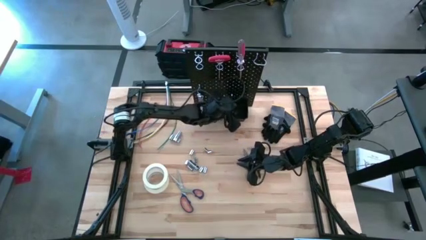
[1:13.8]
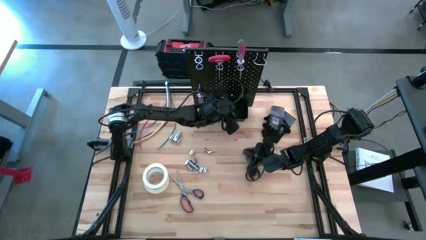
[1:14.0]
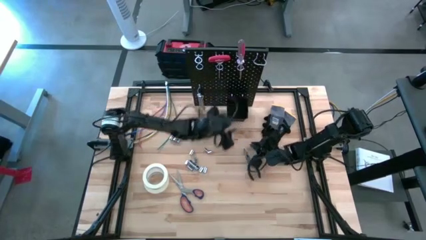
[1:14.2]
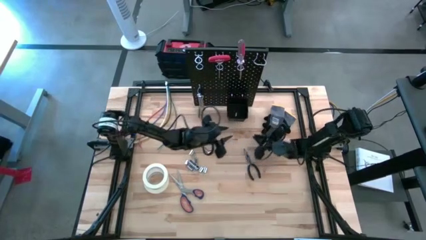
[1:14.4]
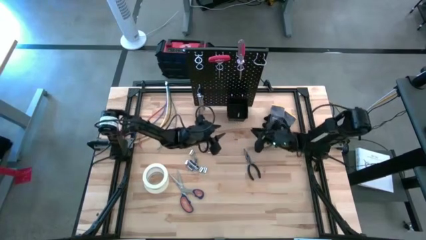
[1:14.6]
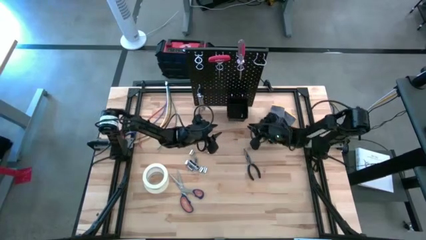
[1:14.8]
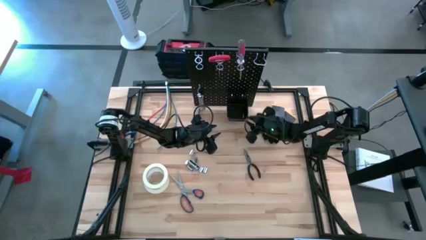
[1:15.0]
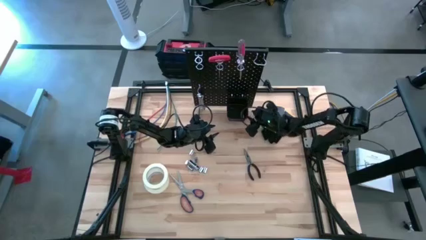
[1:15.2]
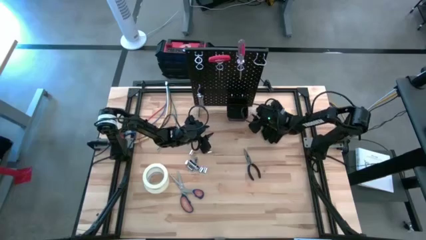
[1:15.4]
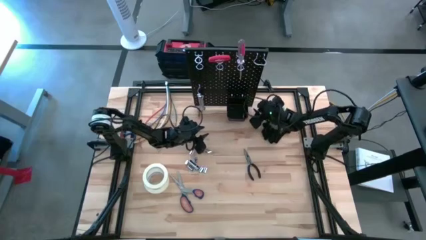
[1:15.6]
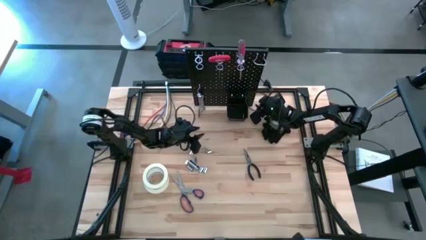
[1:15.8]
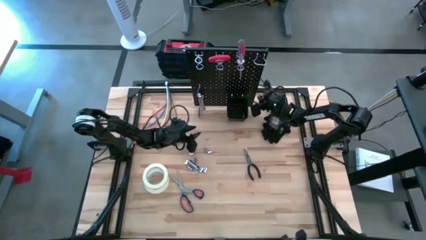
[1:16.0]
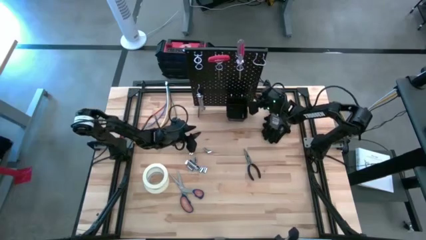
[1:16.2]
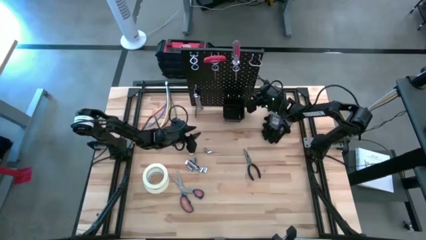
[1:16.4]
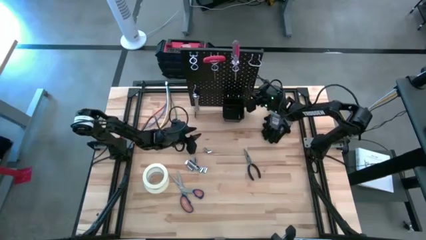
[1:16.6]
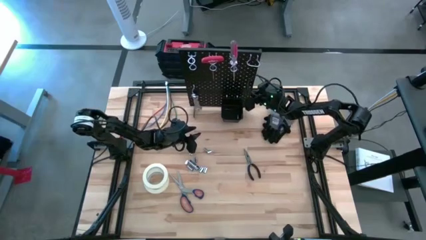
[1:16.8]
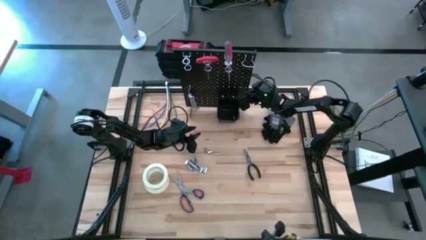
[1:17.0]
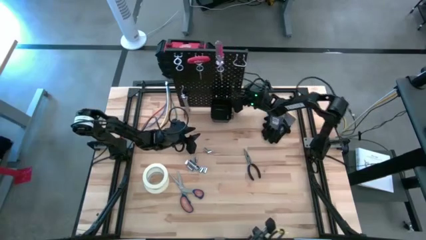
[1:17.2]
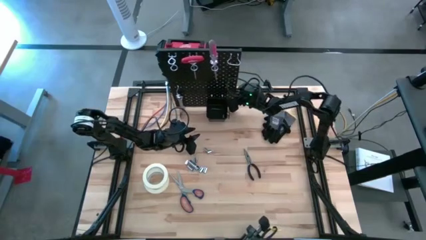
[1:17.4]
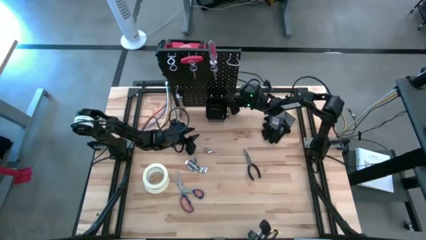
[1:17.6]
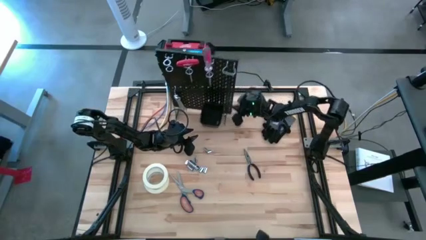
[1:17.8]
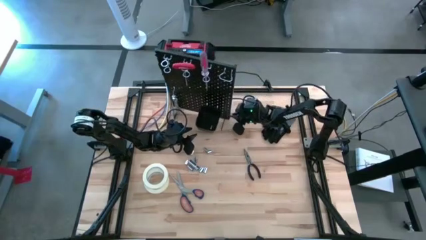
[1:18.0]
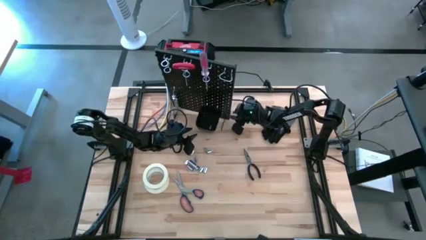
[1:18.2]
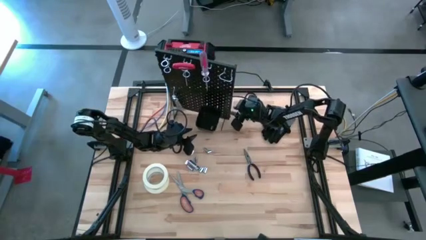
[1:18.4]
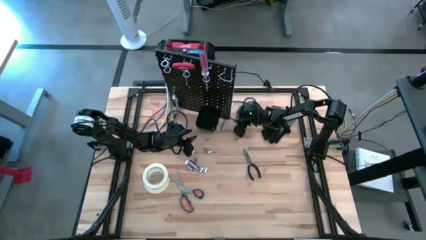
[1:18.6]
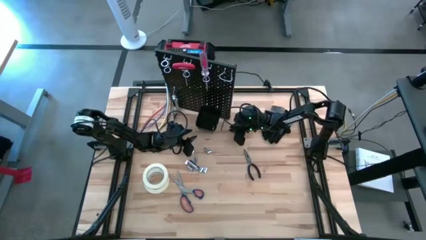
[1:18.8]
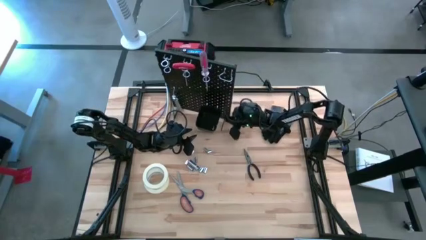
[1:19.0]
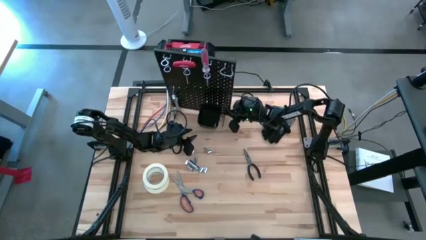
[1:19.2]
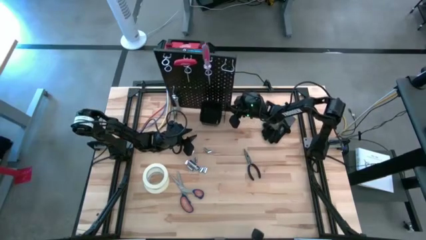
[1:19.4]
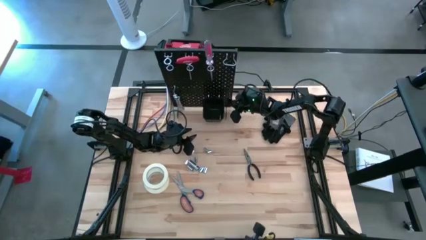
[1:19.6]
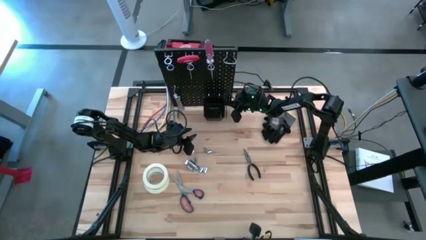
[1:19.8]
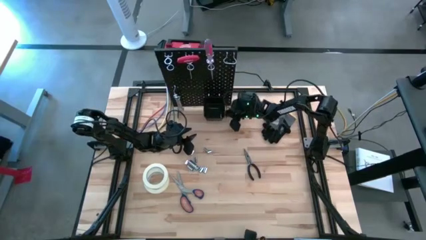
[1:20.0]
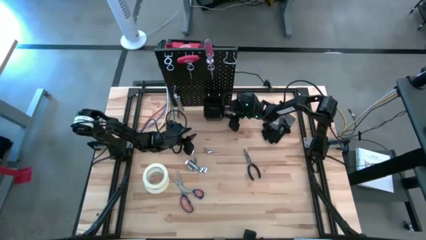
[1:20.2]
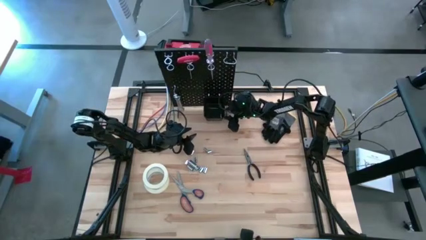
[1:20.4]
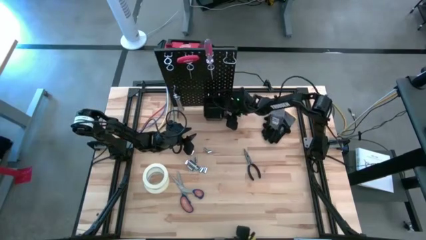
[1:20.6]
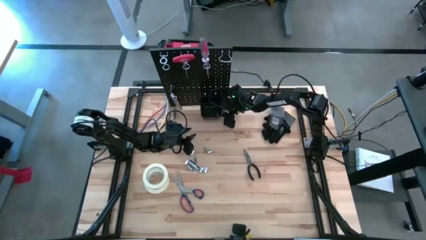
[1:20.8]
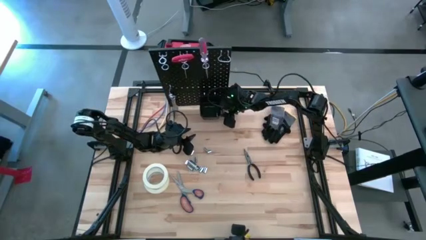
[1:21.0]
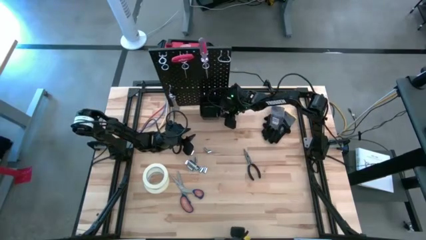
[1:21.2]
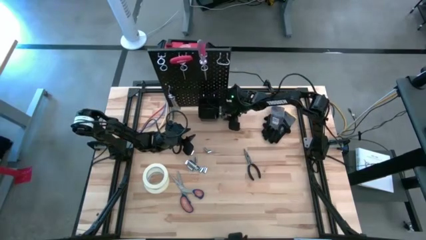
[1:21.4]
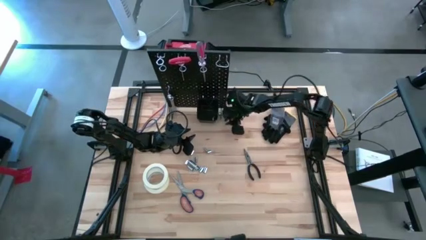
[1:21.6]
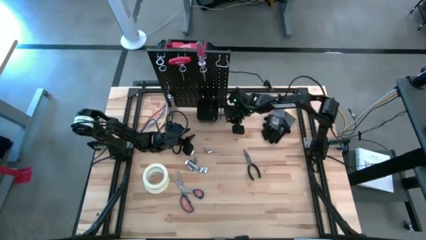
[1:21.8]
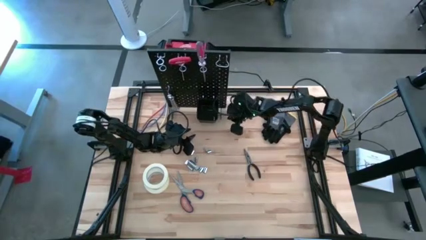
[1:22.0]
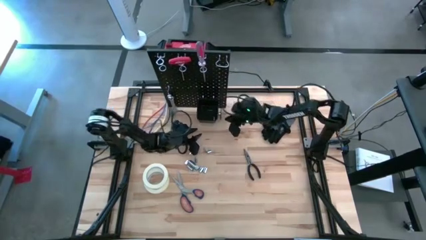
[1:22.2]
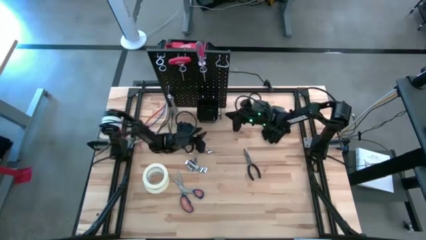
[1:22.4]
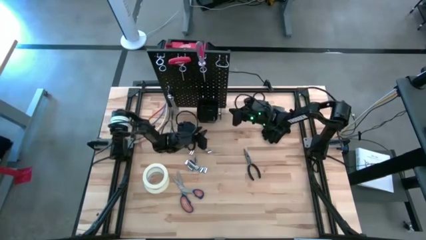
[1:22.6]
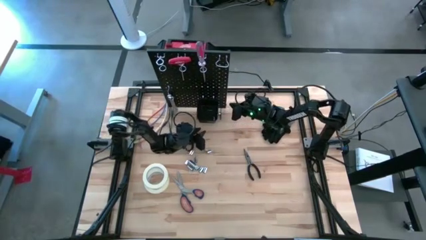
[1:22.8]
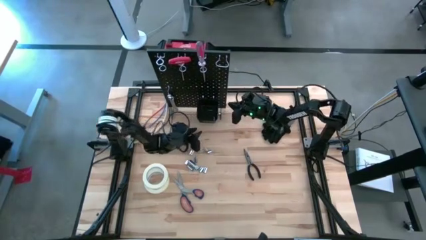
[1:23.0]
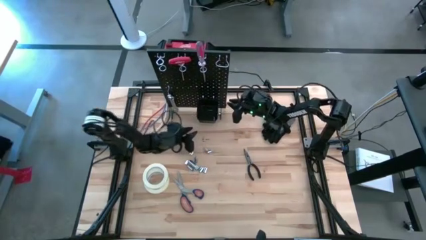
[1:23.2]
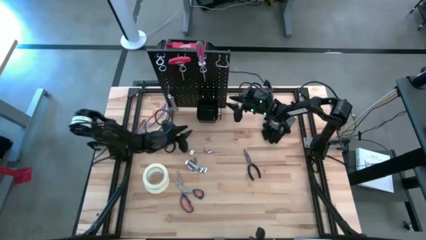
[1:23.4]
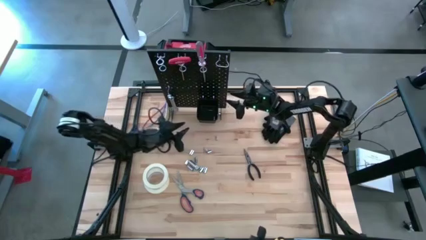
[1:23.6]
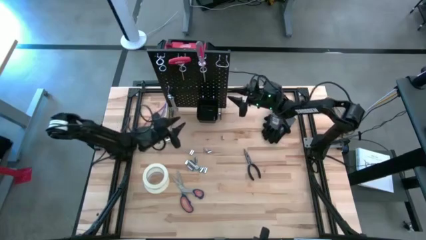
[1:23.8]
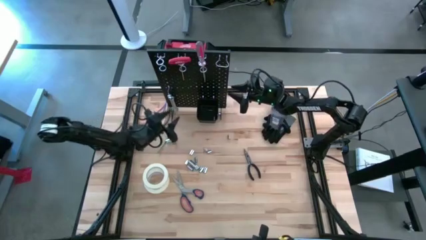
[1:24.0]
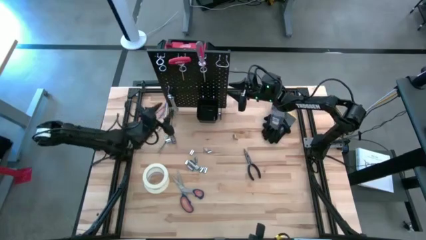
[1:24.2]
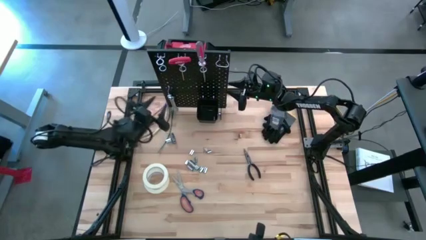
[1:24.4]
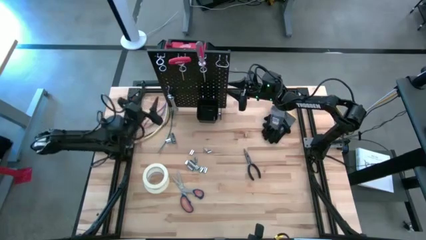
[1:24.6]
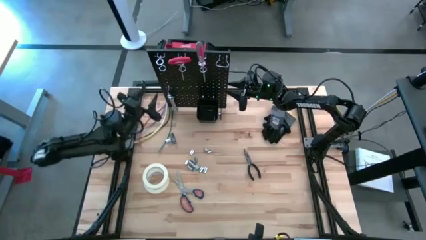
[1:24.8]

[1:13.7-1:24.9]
Task: Hang tools onto peg board
Adjust the peg board

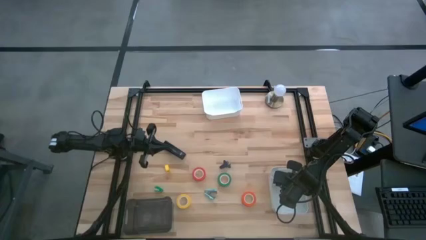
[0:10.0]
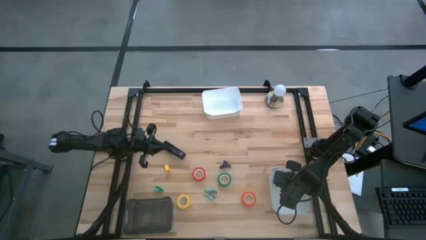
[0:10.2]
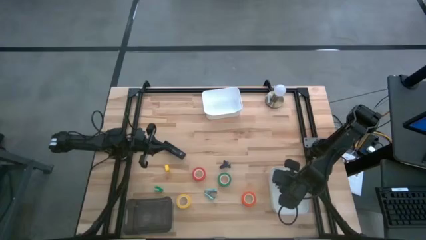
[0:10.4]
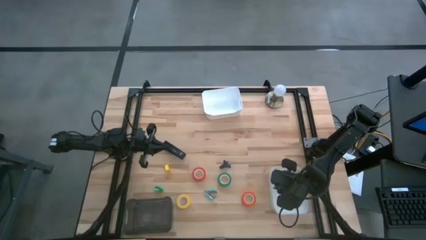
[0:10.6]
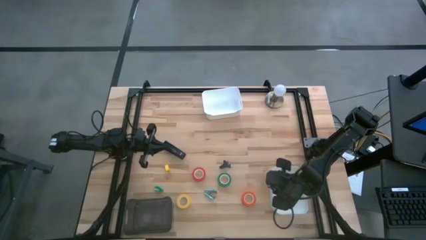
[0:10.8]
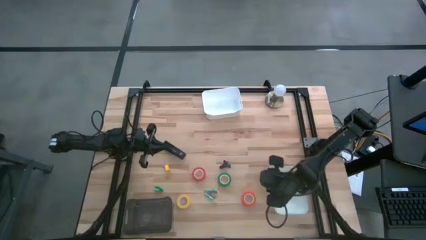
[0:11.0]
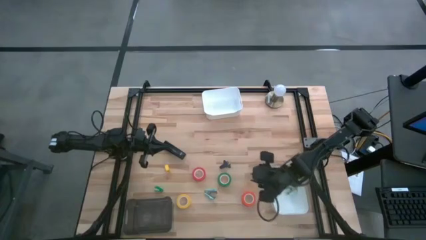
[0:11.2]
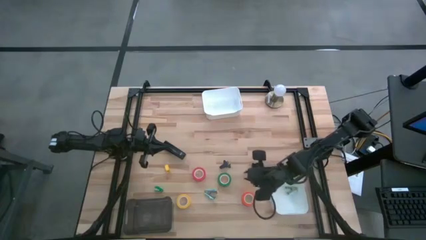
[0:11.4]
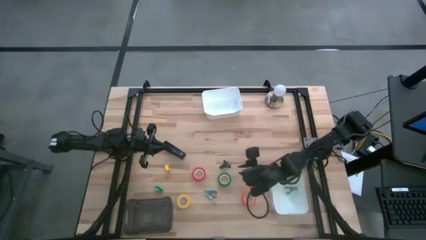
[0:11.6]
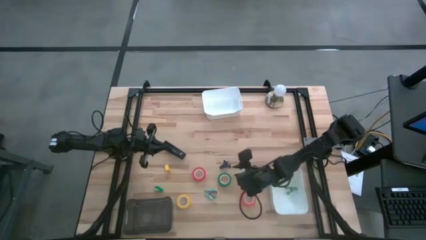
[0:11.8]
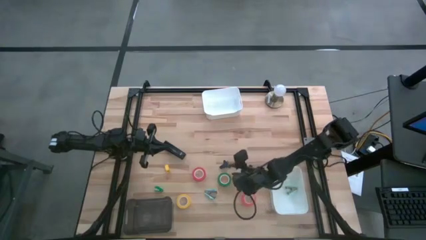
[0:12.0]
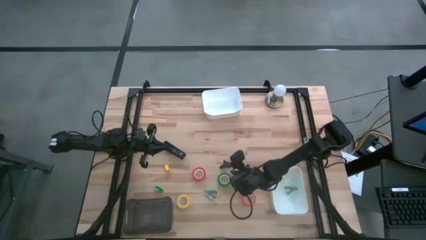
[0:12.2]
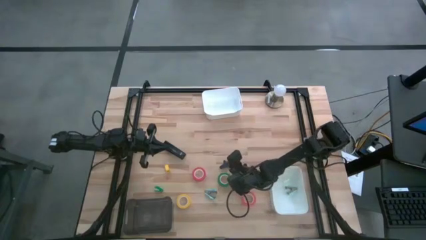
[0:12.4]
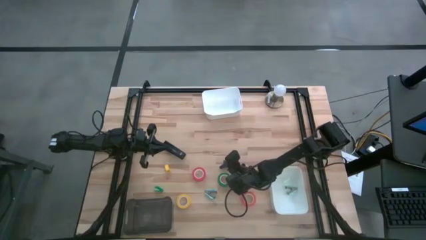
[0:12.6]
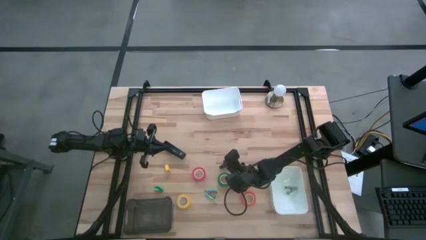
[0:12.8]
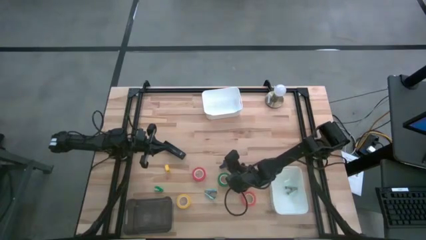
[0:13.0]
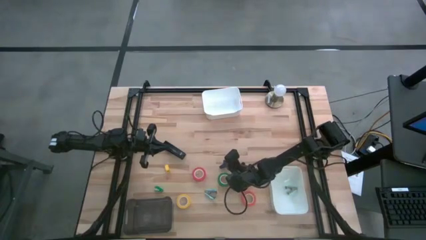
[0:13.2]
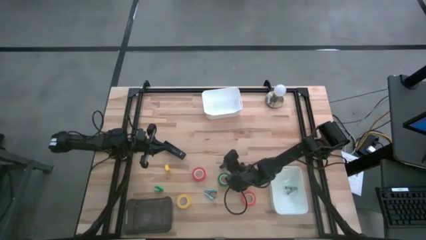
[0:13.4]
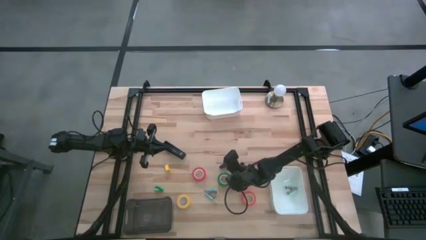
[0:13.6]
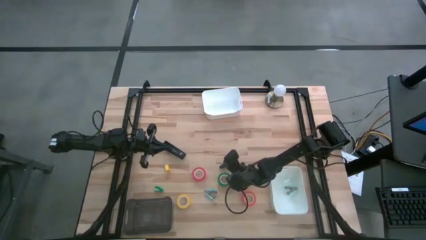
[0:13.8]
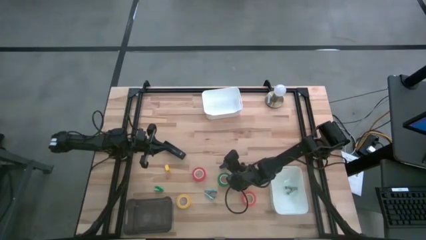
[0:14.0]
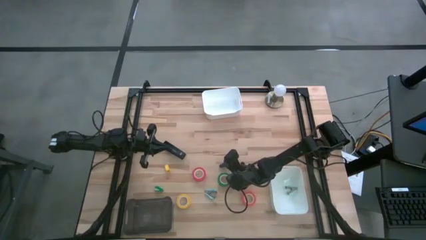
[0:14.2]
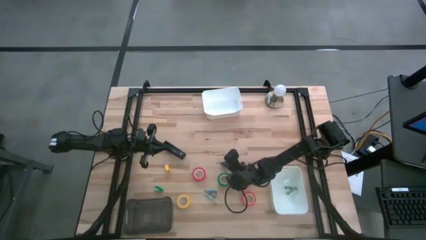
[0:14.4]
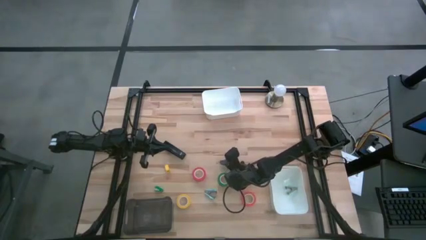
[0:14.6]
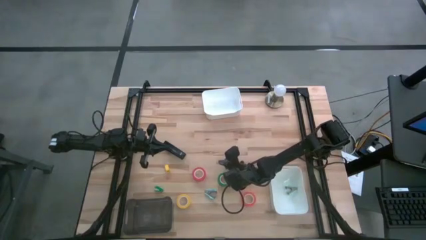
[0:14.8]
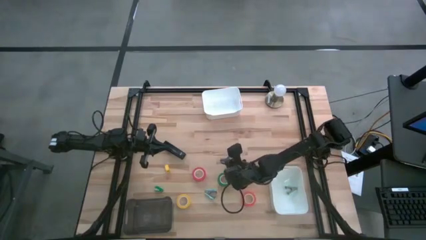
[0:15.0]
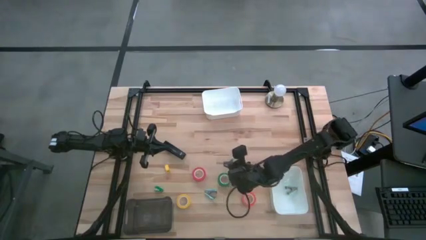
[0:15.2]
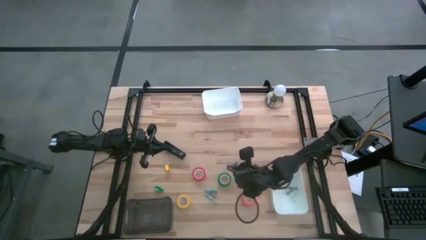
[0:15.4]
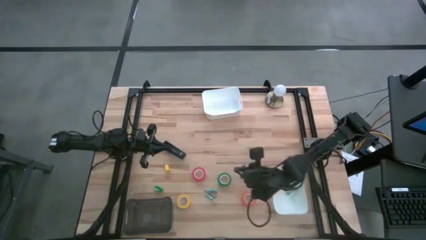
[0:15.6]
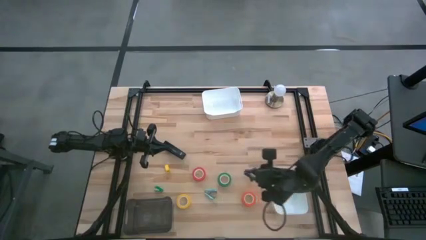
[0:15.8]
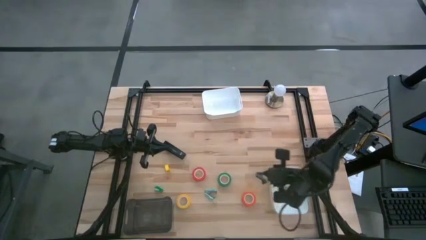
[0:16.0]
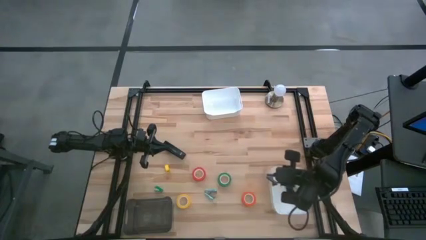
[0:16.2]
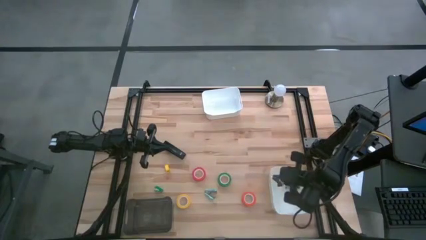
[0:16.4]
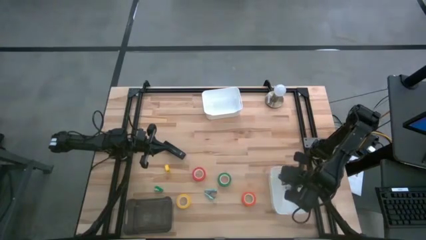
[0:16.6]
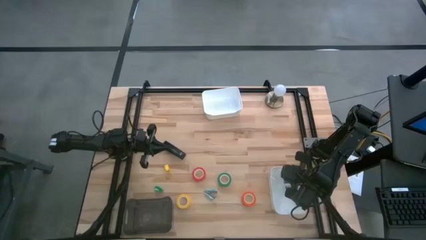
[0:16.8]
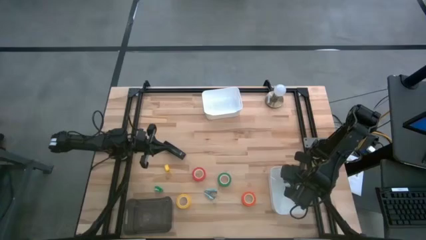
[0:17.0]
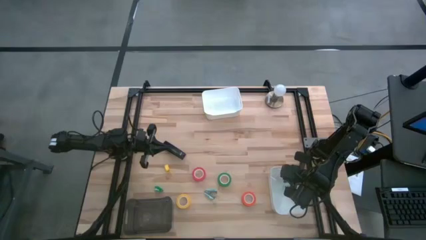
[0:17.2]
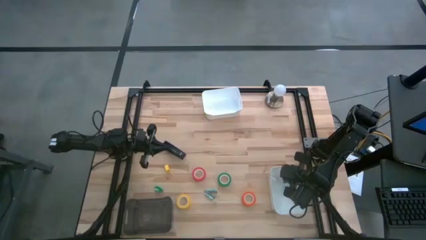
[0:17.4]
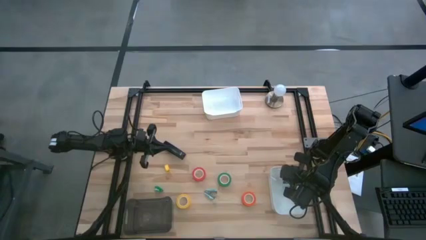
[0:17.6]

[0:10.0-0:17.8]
Task: Pick and place Stapler, Stapler remover, tape
Put the dark blue staple remover into the bottom white bin
